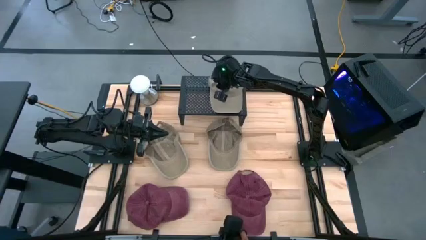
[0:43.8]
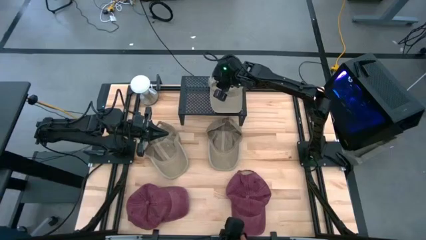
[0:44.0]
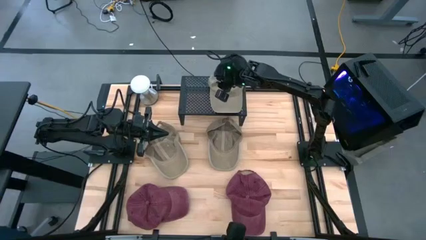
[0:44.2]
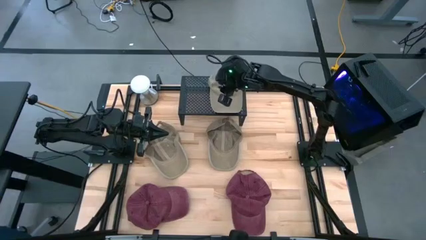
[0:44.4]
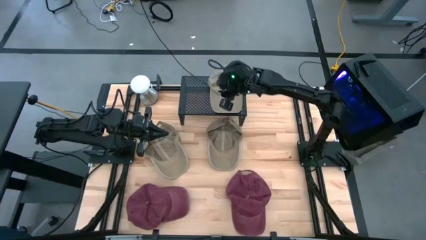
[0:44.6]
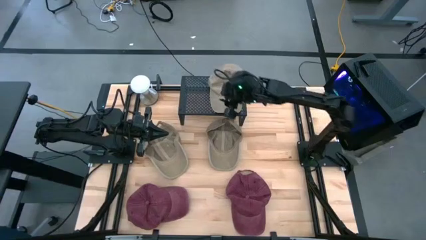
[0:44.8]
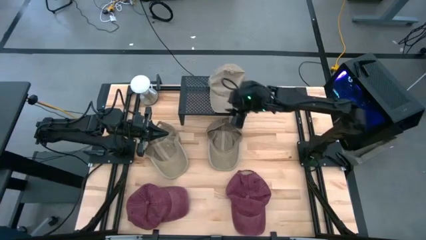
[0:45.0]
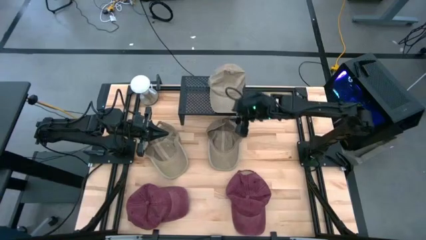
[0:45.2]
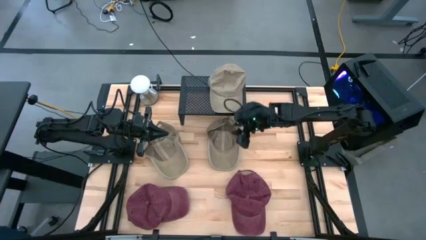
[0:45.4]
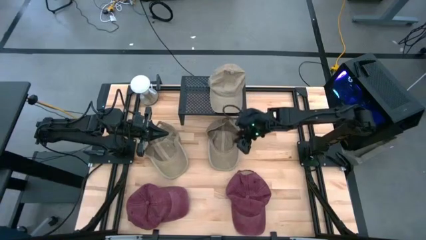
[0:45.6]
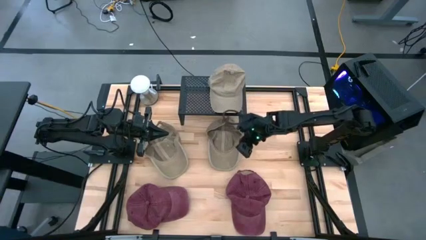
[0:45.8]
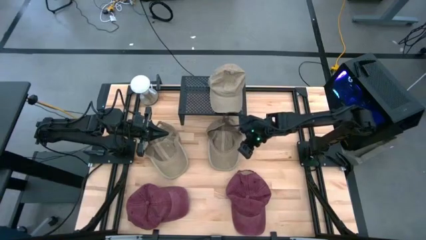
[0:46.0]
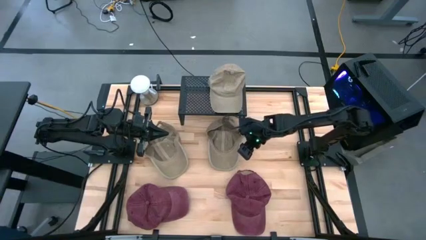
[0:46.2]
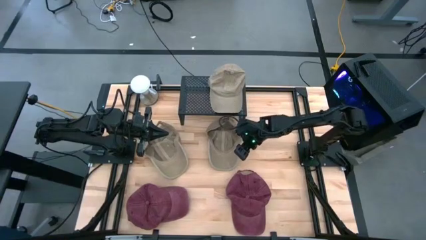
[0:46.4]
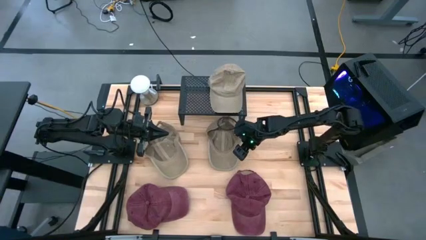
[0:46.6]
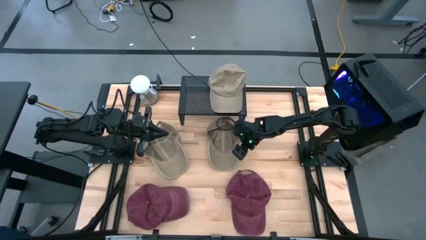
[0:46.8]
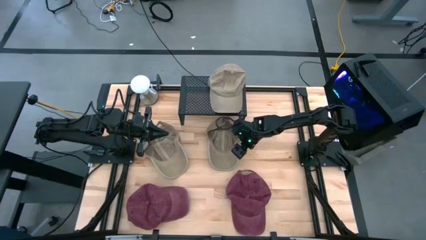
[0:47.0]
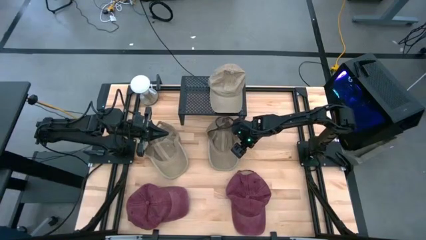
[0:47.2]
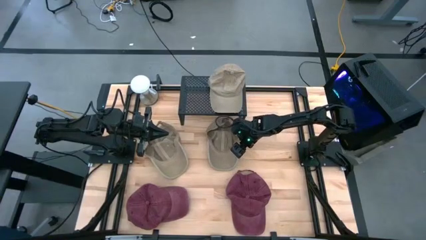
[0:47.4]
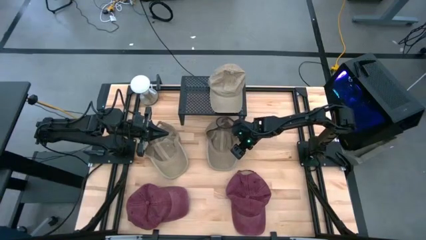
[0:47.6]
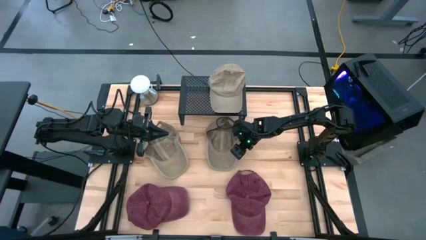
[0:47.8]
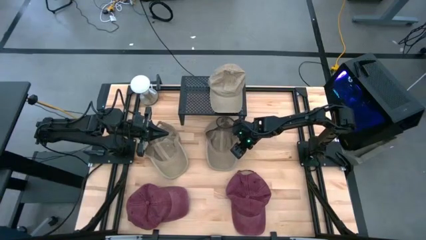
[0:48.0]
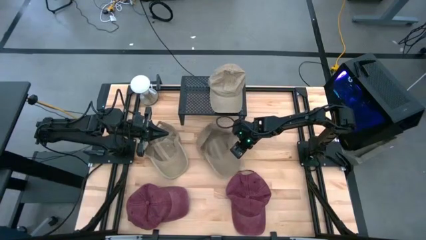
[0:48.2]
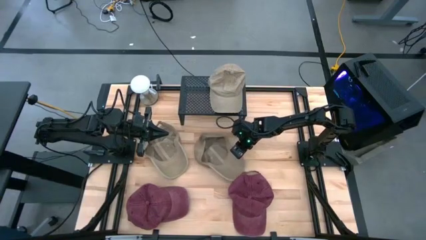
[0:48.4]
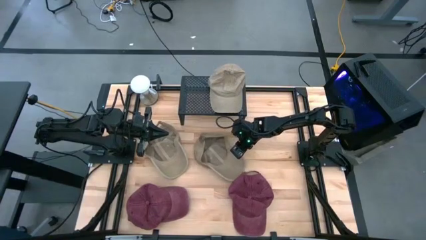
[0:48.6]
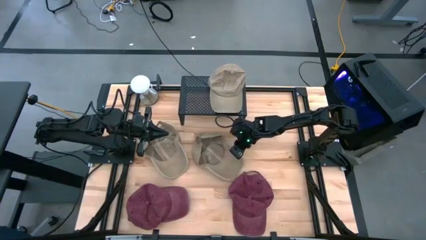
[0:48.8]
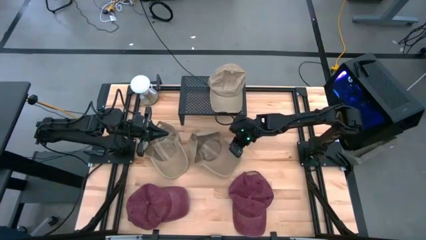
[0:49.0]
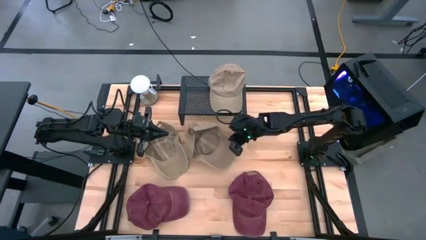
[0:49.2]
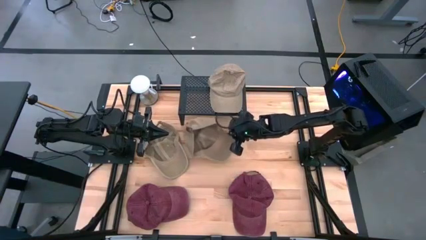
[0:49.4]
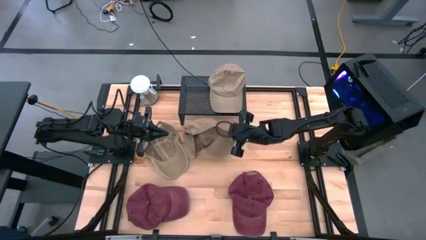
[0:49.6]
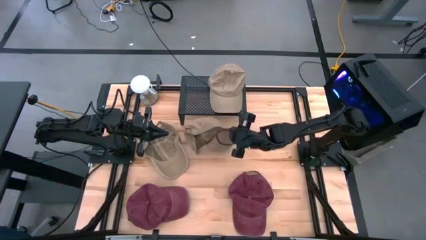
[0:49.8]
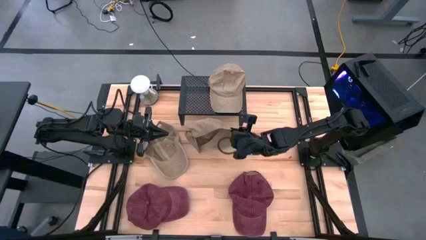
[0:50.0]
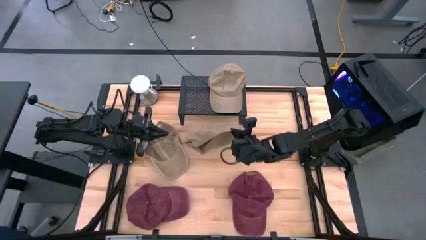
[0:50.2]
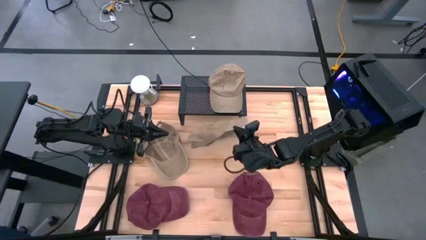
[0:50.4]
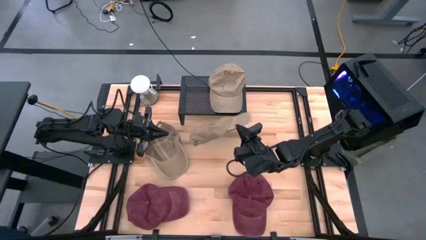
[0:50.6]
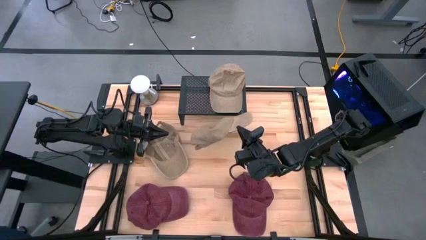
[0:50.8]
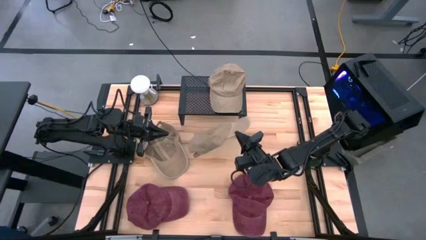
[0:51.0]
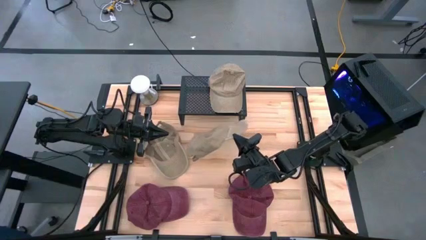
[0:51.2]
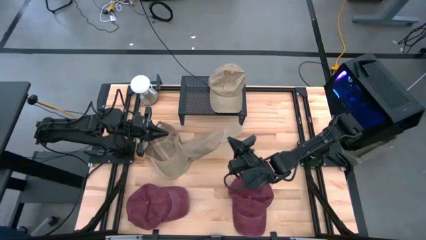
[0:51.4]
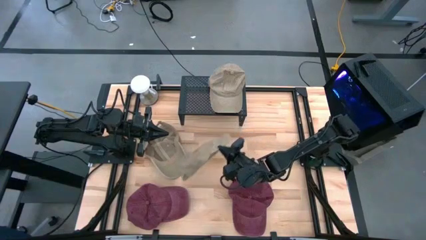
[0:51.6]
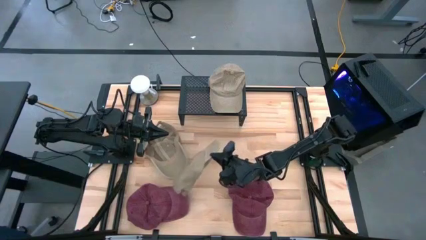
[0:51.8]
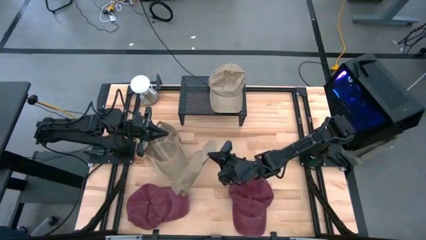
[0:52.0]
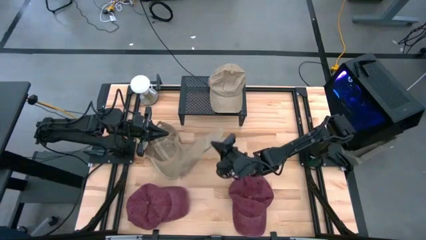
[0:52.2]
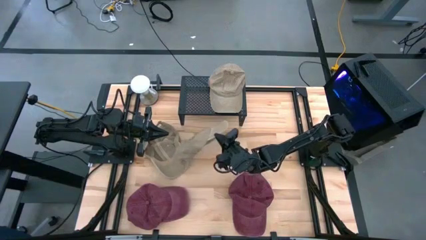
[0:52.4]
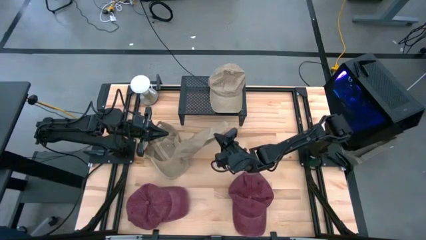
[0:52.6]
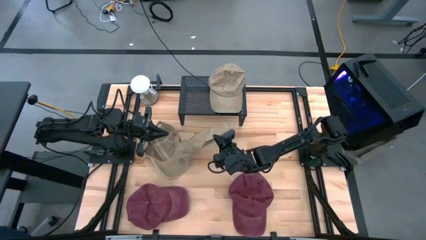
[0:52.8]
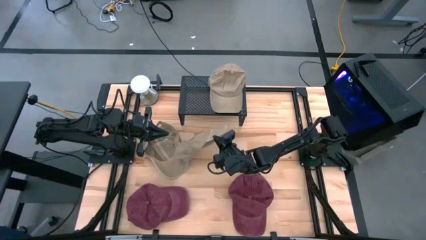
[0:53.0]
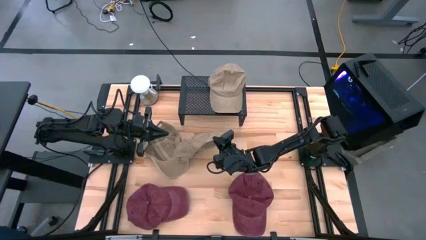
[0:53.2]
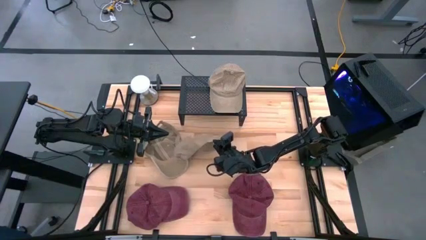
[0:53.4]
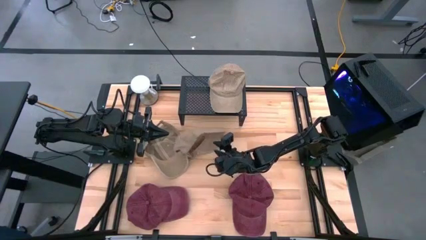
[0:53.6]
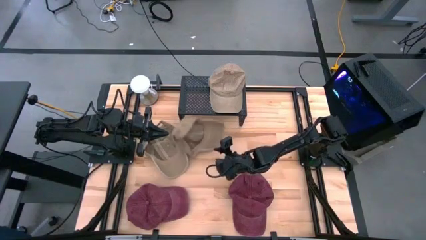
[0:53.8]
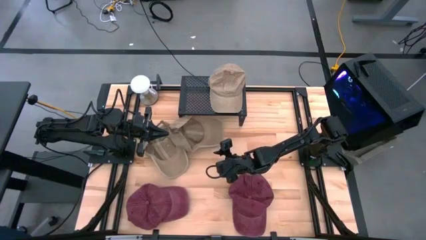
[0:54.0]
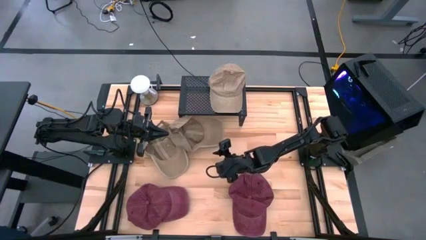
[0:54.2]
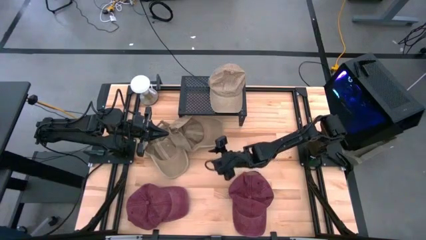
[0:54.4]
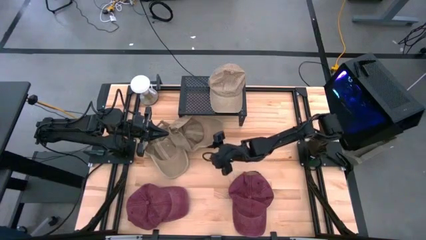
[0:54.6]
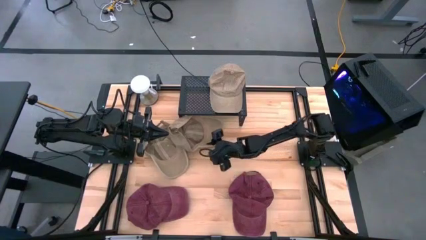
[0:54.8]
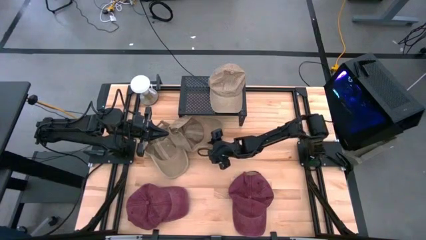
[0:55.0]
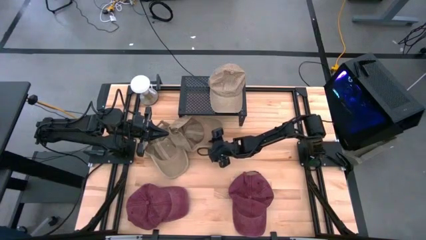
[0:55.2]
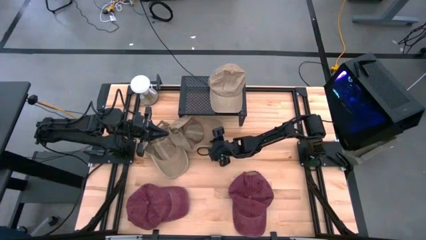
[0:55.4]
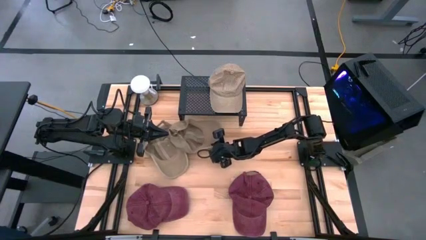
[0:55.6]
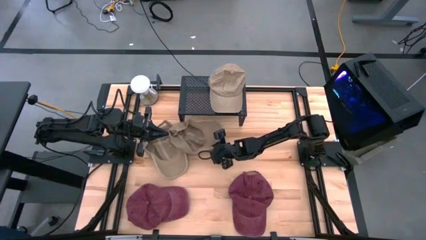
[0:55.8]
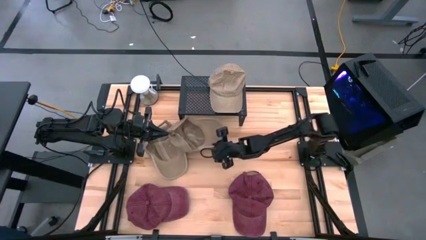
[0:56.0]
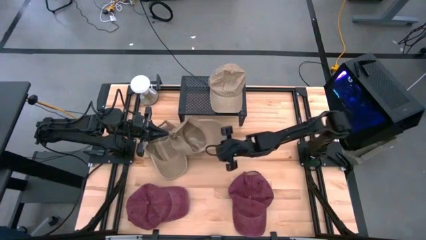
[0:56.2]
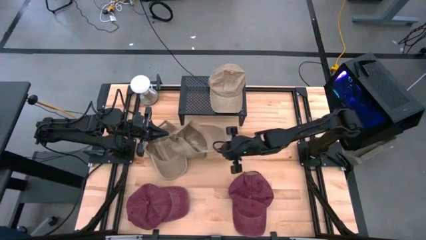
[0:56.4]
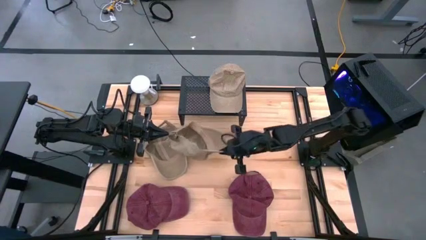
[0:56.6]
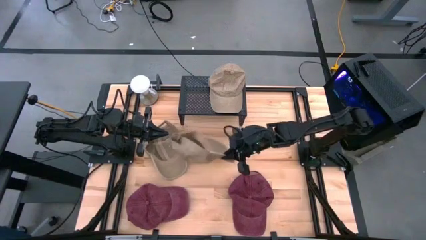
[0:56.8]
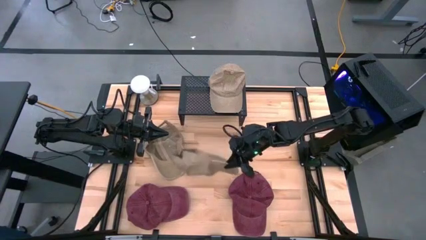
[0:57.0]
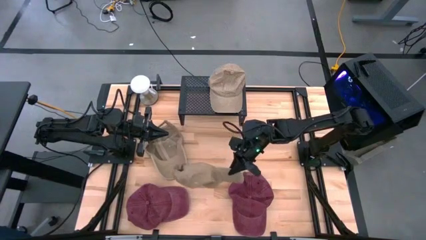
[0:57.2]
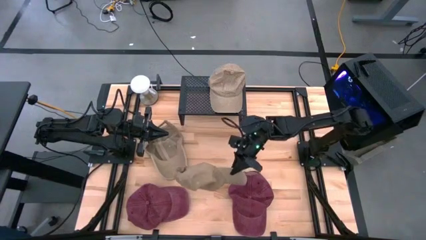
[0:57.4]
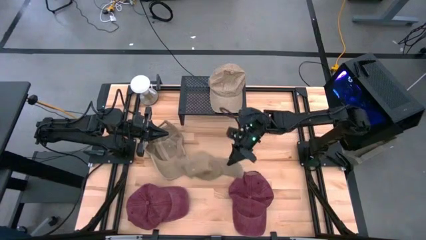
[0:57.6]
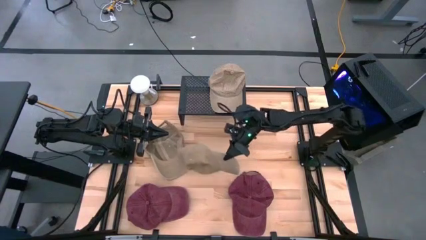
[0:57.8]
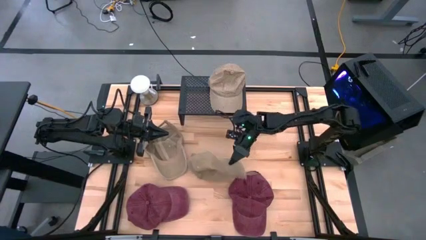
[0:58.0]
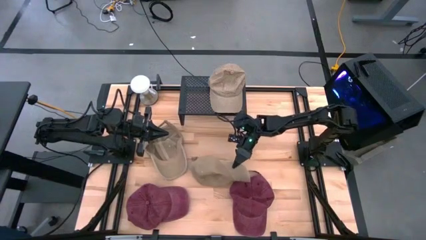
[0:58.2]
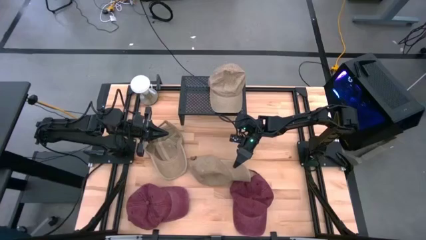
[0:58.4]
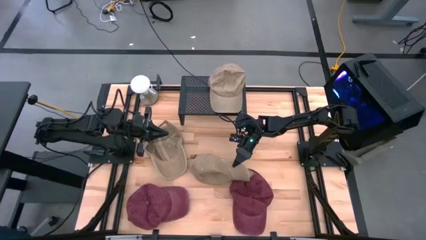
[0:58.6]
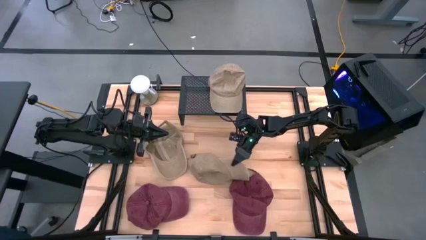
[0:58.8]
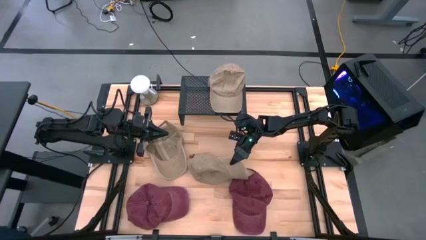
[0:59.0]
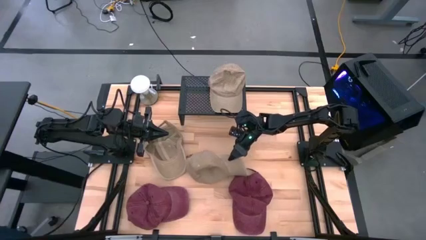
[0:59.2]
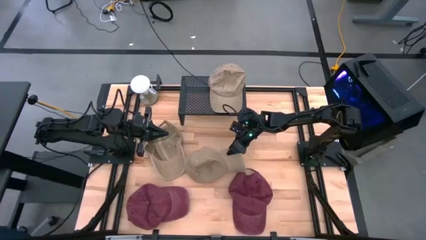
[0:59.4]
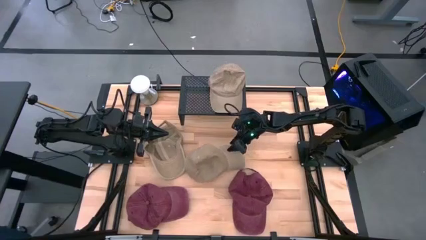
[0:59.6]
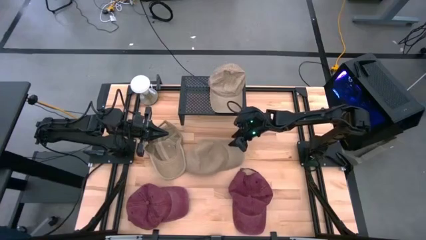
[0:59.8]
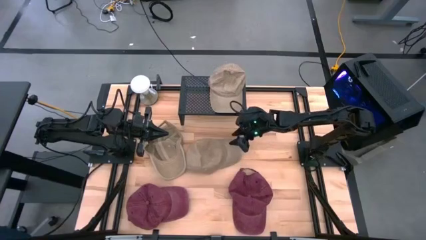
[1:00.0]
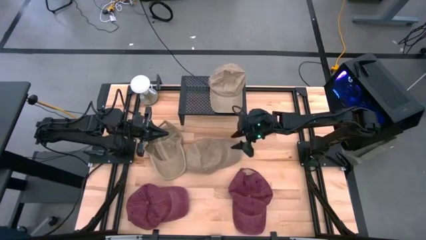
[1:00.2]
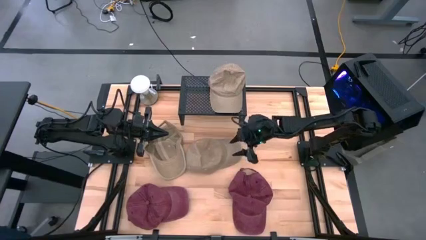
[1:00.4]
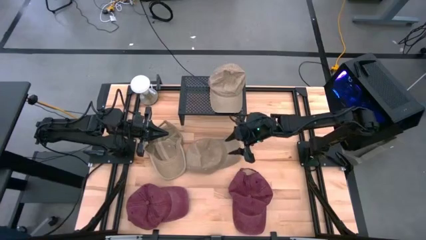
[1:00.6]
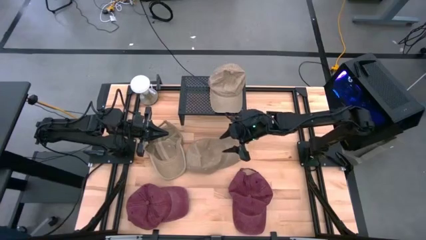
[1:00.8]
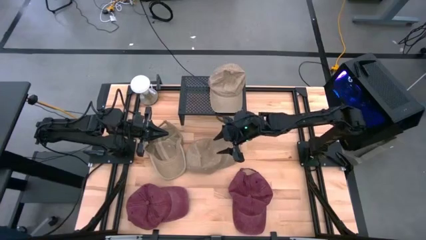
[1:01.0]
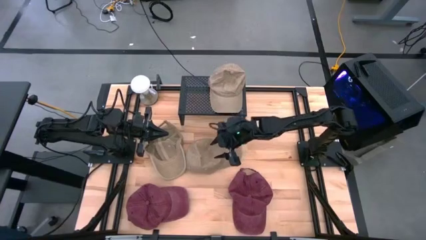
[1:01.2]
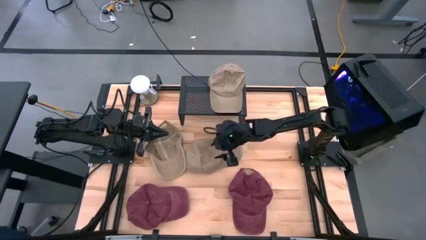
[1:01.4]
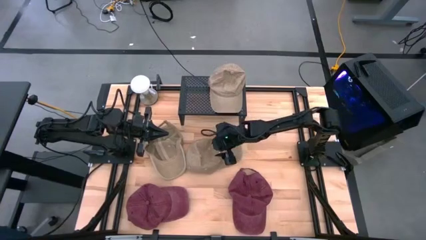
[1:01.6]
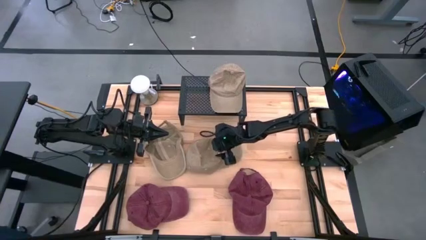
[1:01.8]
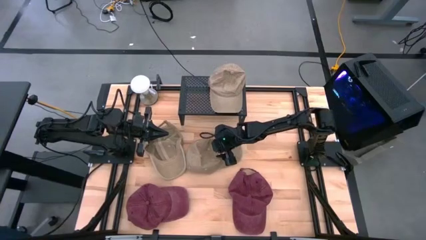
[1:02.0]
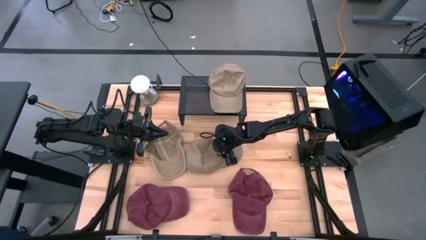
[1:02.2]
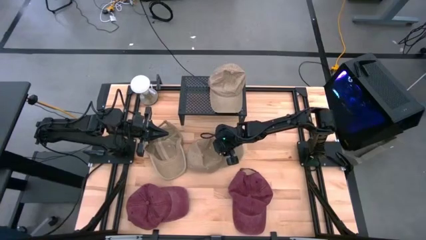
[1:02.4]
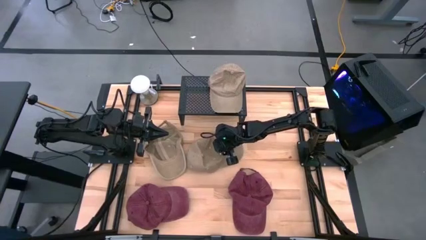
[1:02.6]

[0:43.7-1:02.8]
Task: Pick & Place hat
Stack the right brown cap on the brown cap on the shelf
